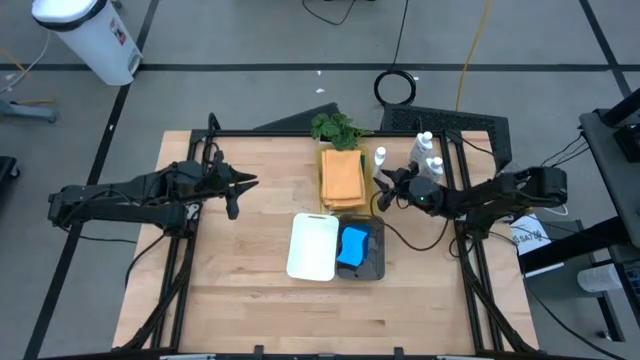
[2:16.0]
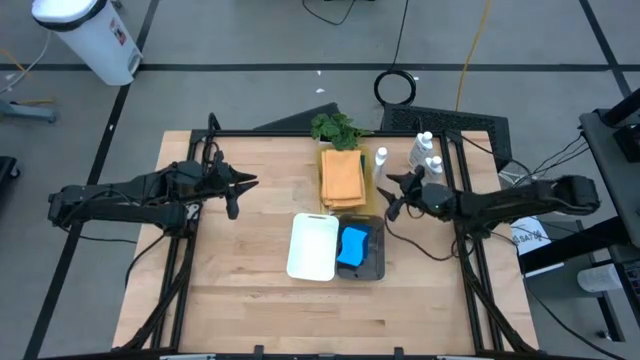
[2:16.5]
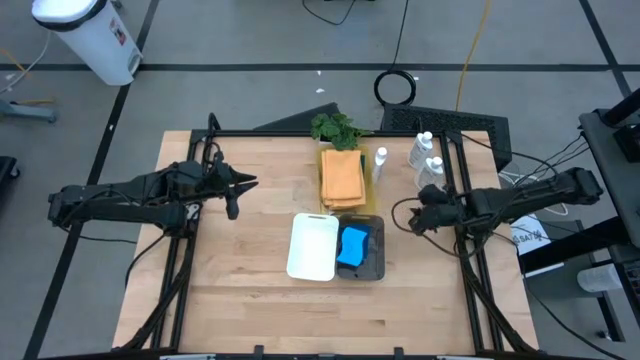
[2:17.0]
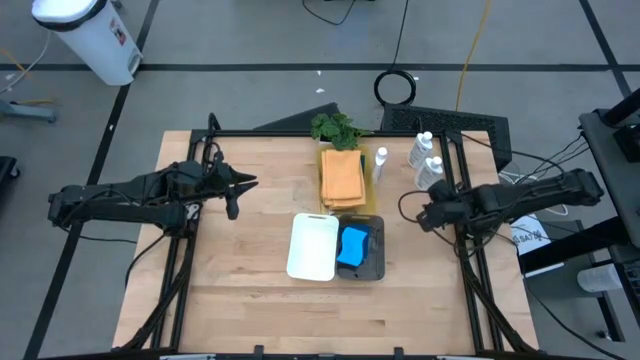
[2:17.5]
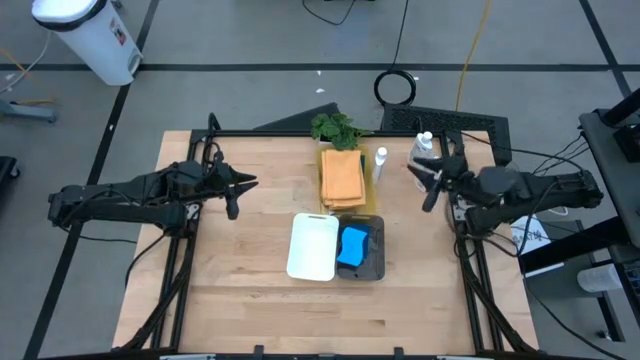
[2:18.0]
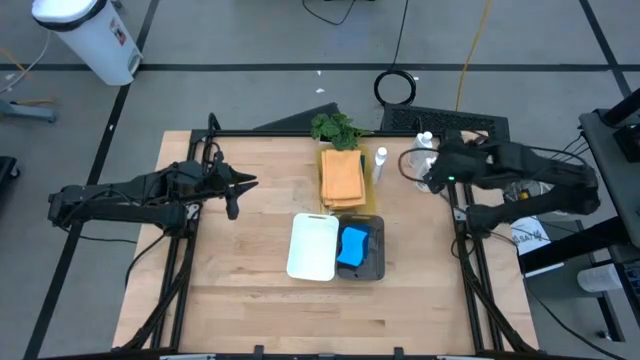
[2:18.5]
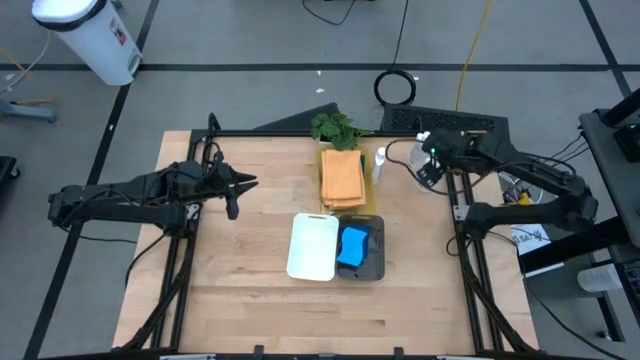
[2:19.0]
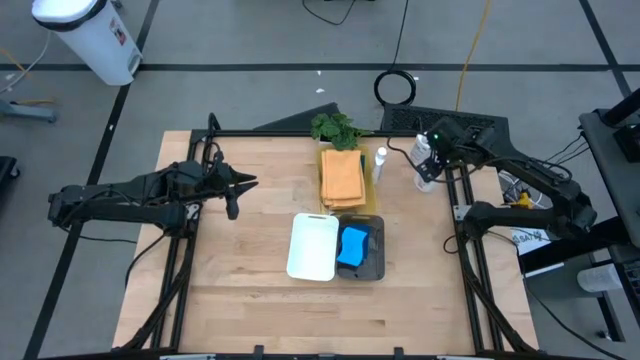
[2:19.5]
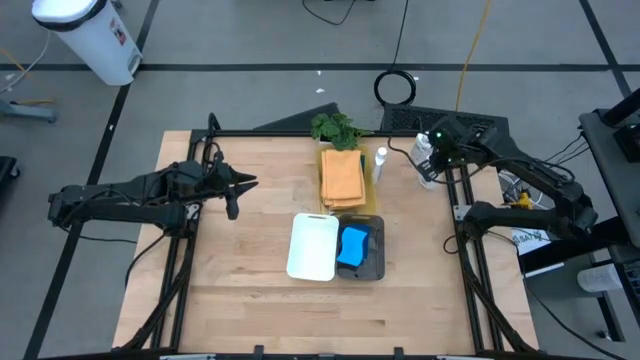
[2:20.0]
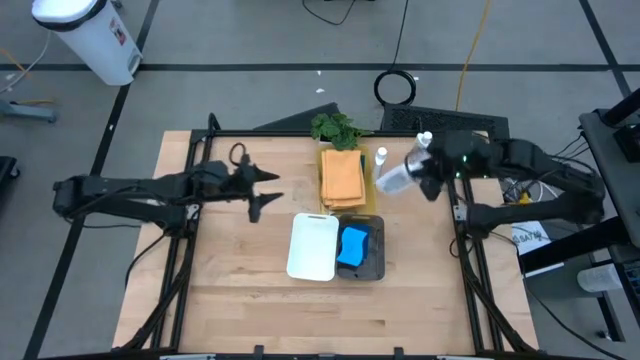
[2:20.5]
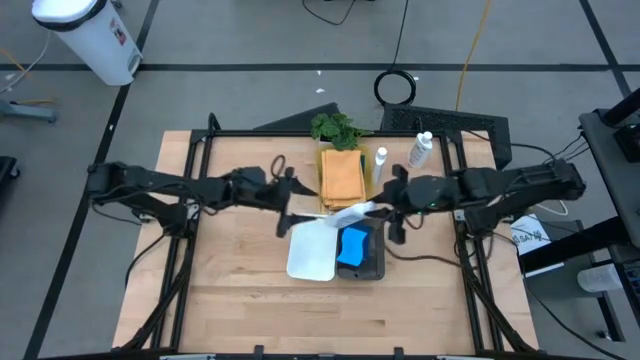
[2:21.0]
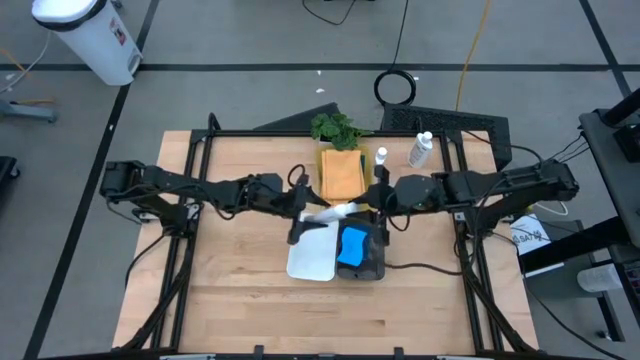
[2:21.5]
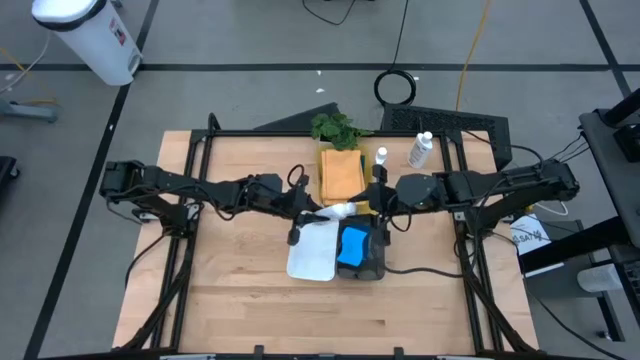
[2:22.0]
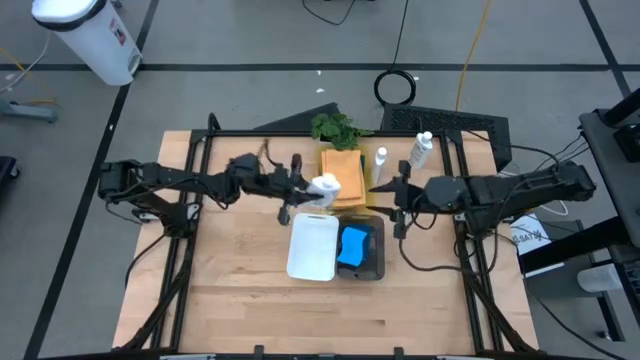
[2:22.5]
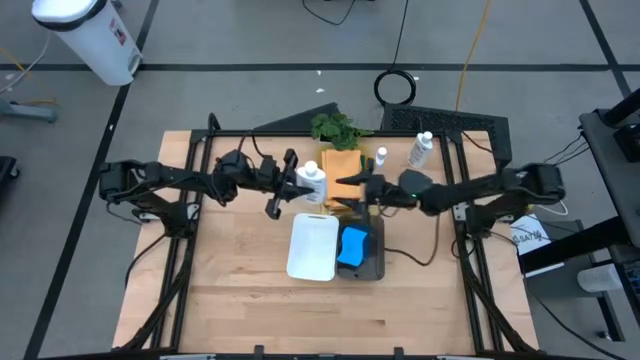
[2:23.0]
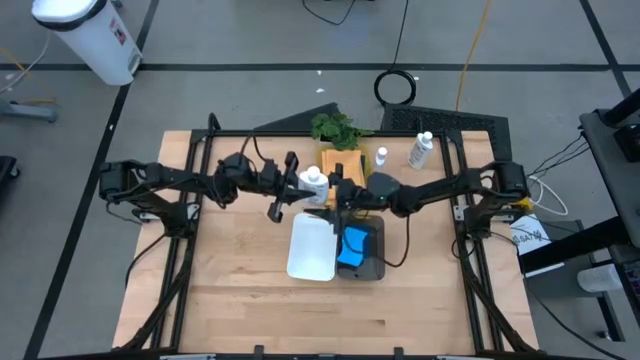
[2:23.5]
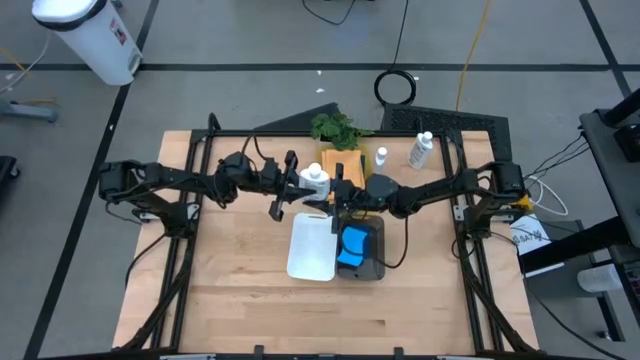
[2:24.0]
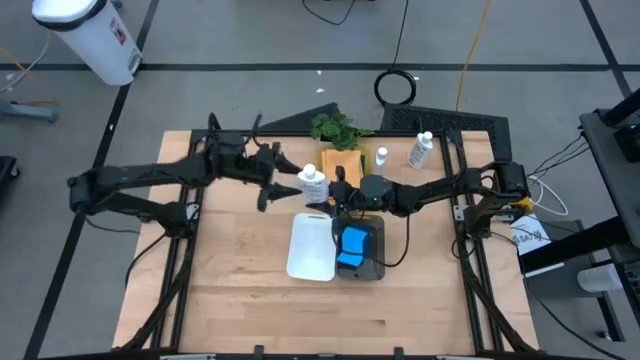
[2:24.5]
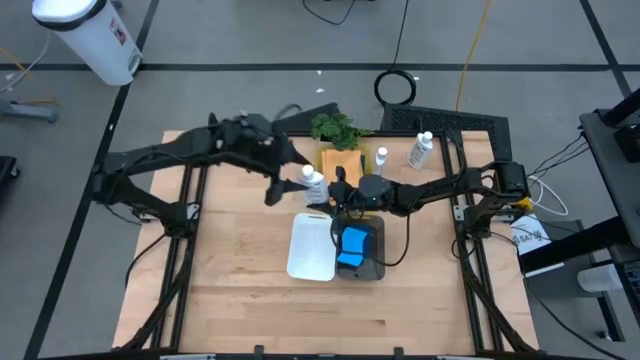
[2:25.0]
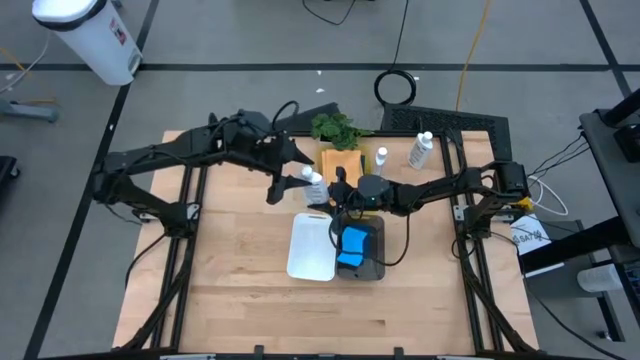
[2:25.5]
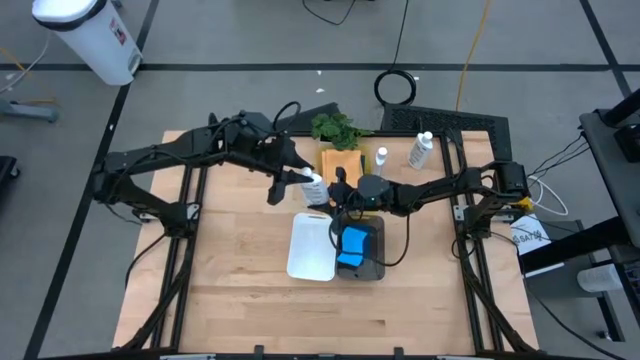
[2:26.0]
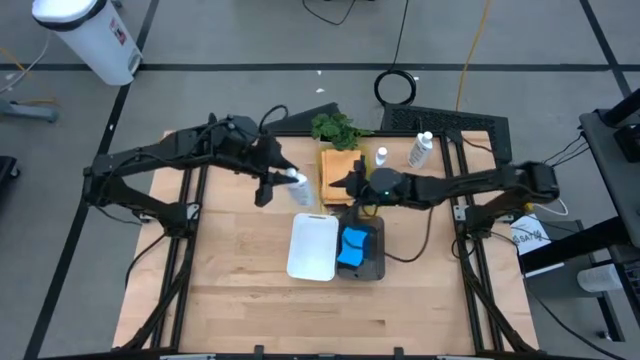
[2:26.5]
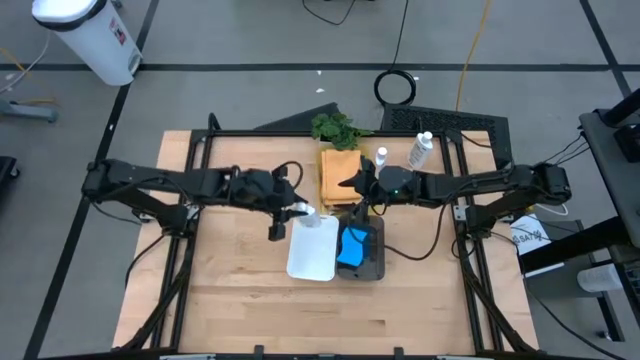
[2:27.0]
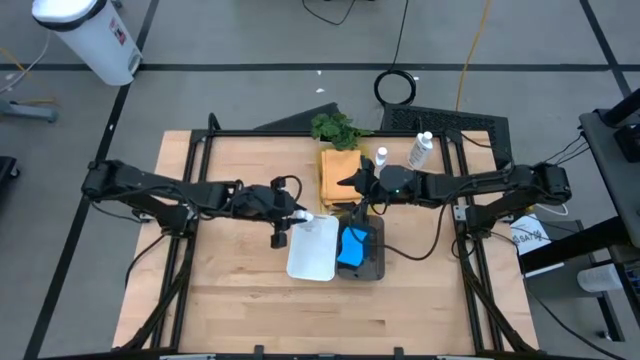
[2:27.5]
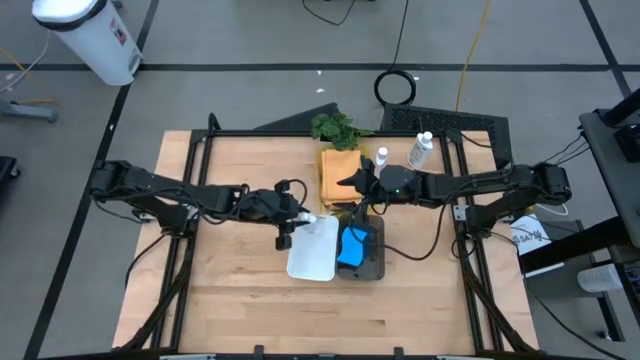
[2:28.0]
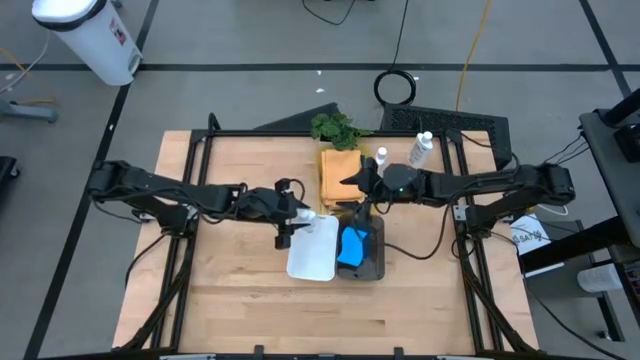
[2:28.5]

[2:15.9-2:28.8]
Task: Pick & Place Kitchen Items
Put the bottom plastic restorer bottle into the white bin

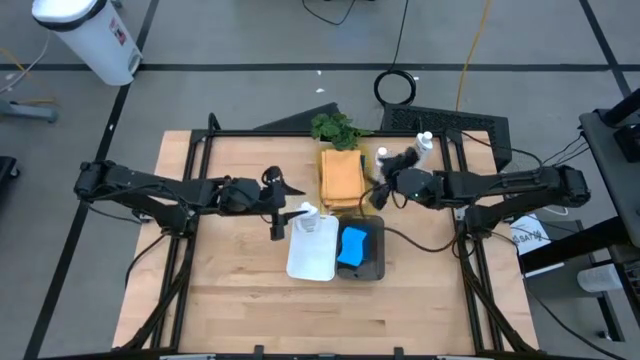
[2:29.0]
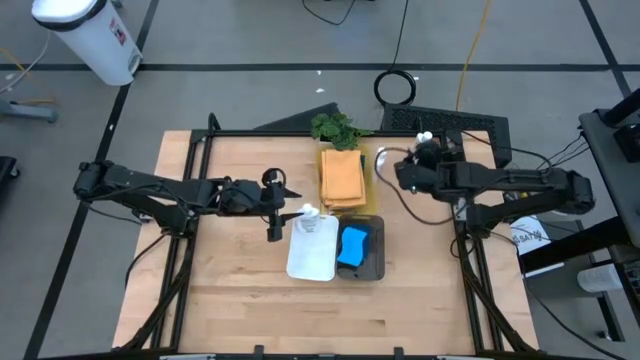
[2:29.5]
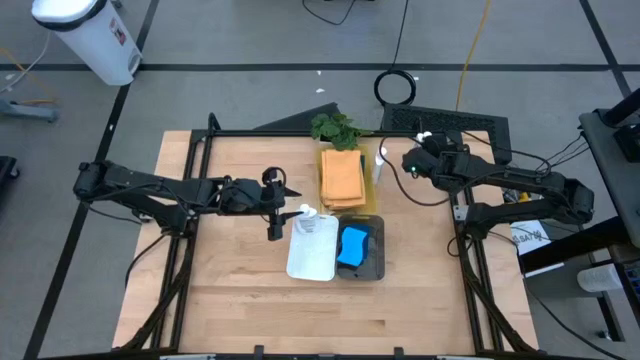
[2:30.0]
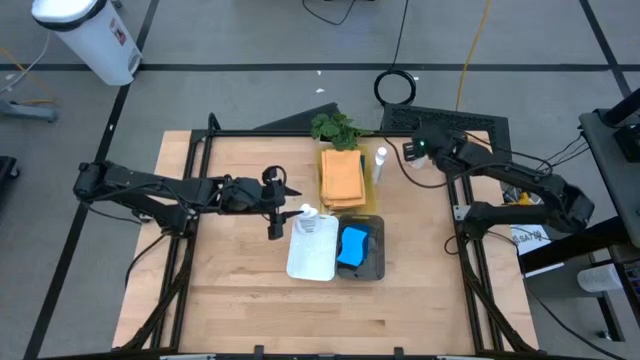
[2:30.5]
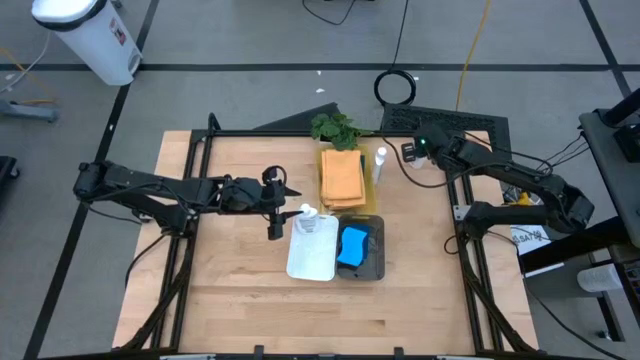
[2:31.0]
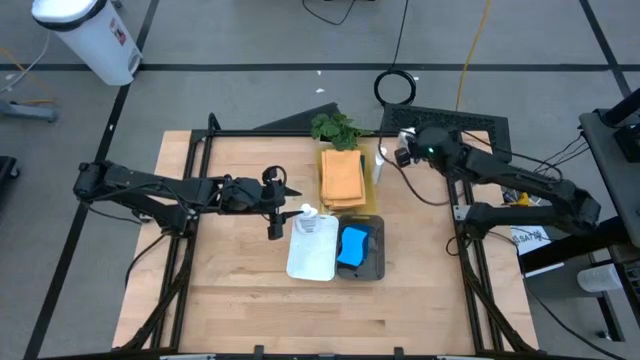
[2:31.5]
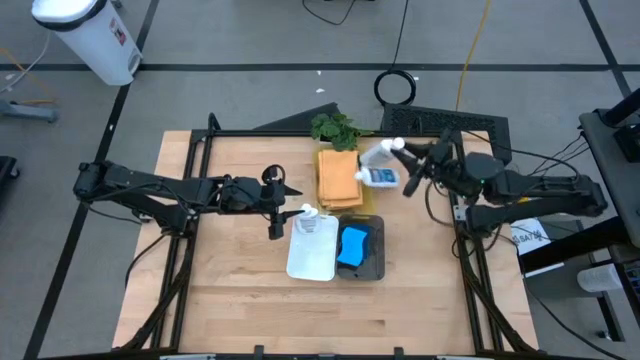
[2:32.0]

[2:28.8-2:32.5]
Put the right clear plastic restorer into the white bin

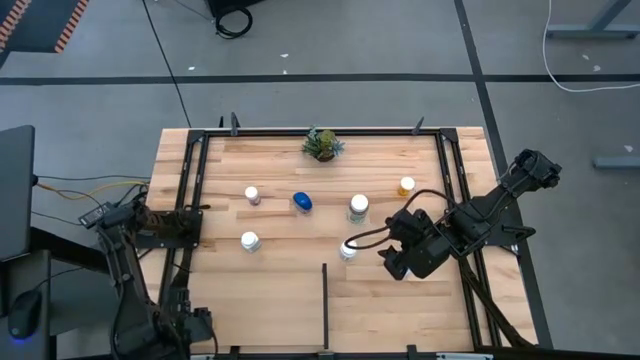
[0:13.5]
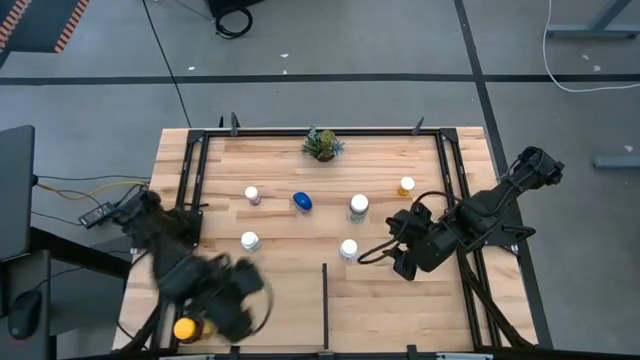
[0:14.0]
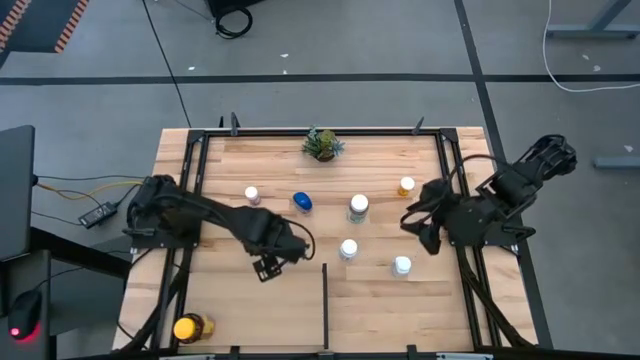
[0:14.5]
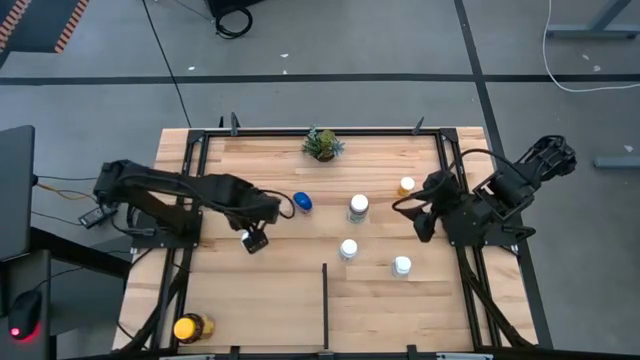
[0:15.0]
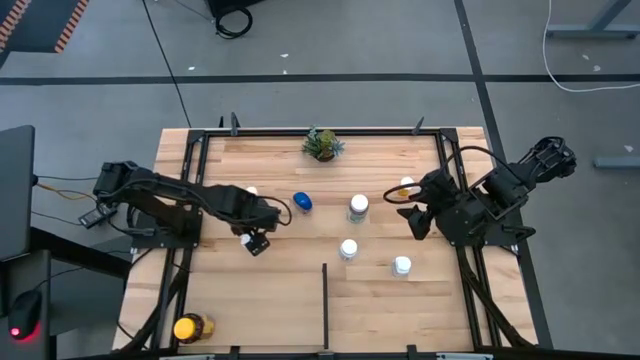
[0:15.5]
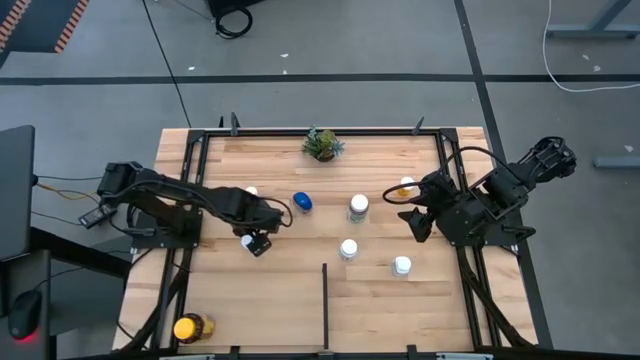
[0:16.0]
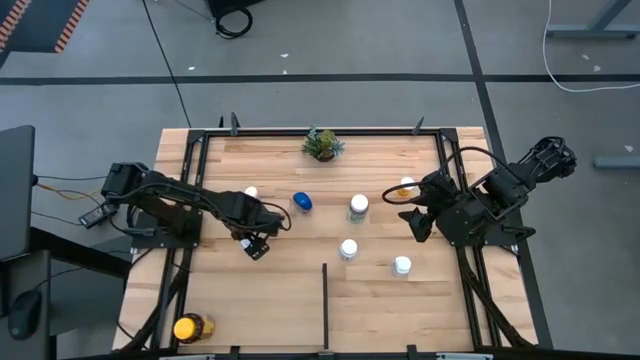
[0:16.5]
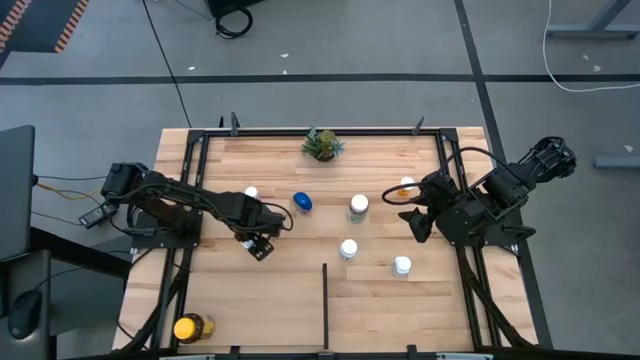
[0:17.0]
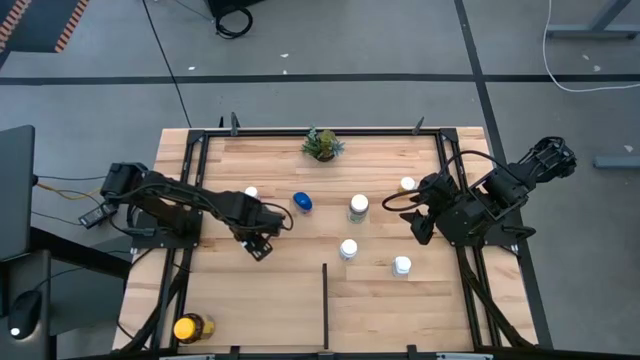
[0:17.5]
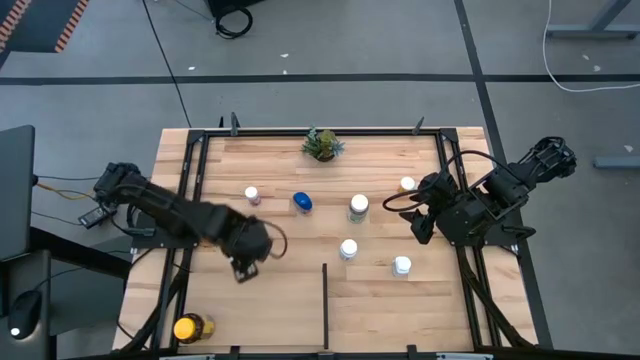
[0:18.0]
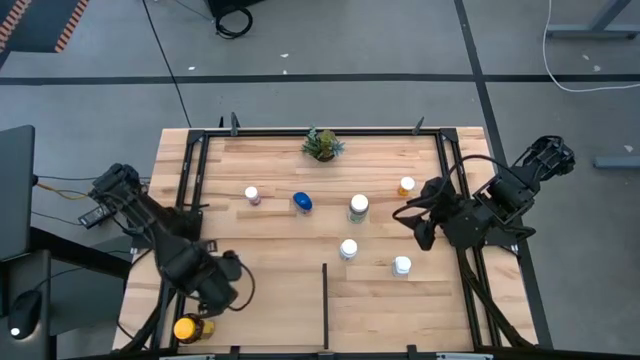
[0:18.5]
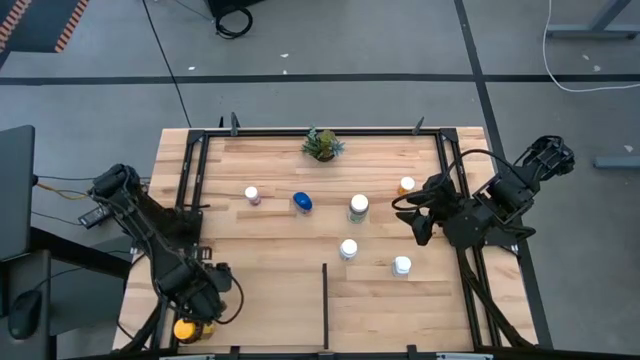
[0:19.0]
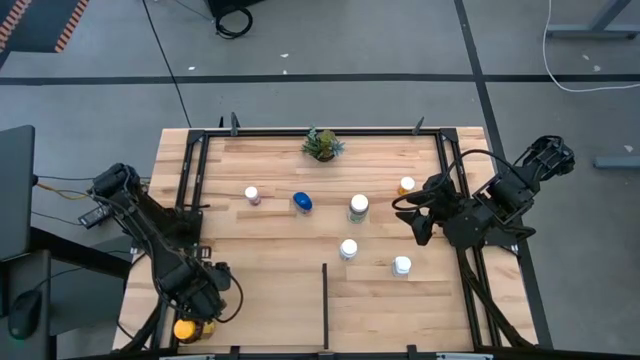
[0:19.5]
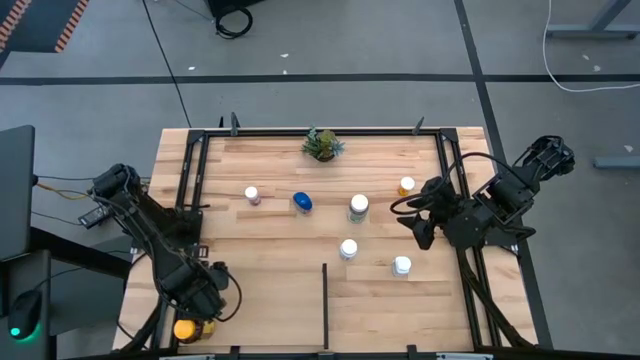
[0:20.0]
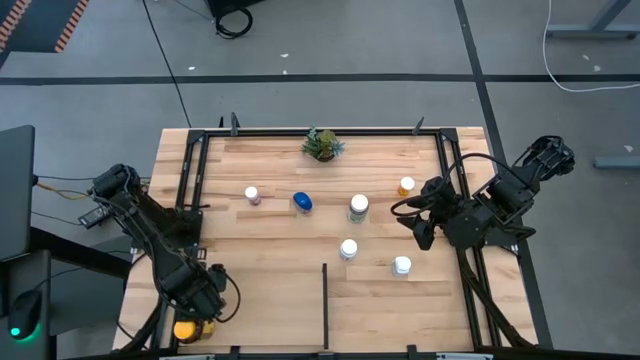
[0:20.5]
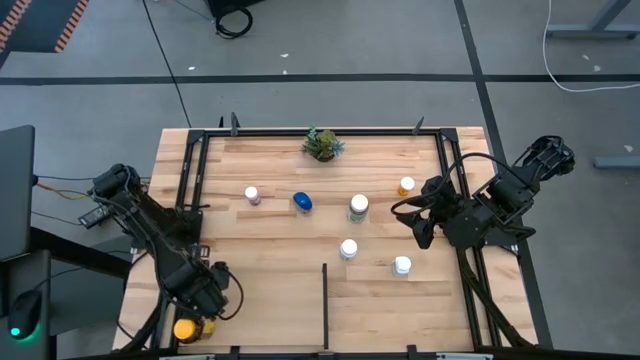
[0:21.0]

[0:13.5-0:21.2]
Task: Pick and place medicine bottles onto shelf by color
Put the left white and blue medicine bottle on the shelf
